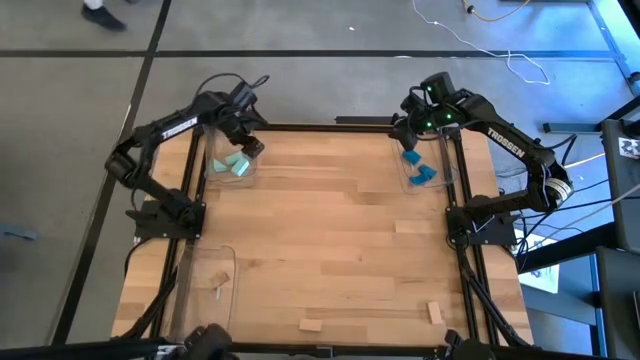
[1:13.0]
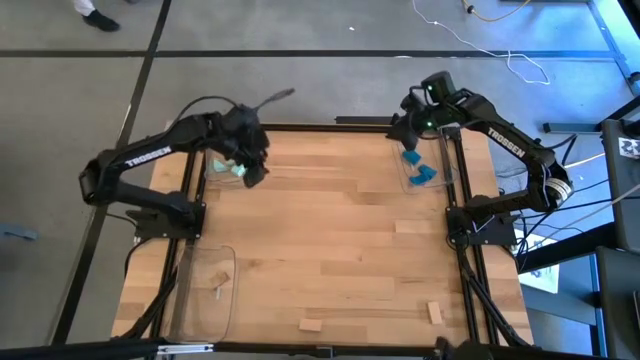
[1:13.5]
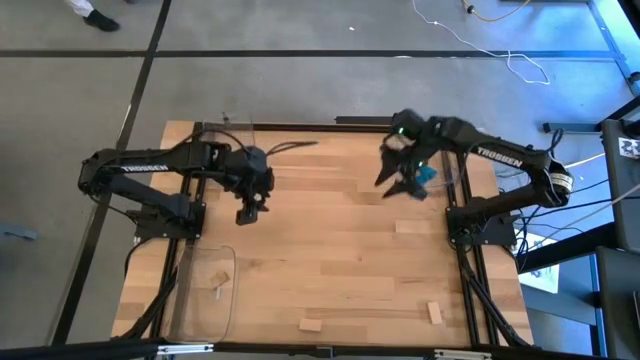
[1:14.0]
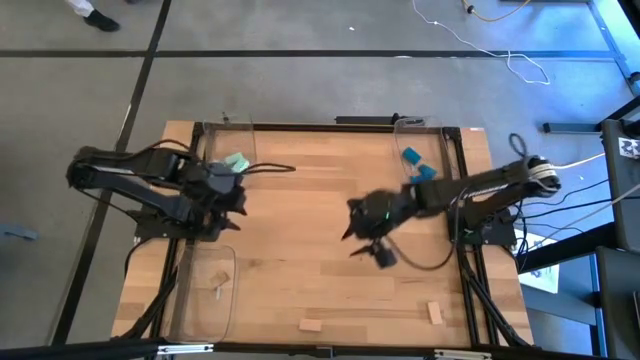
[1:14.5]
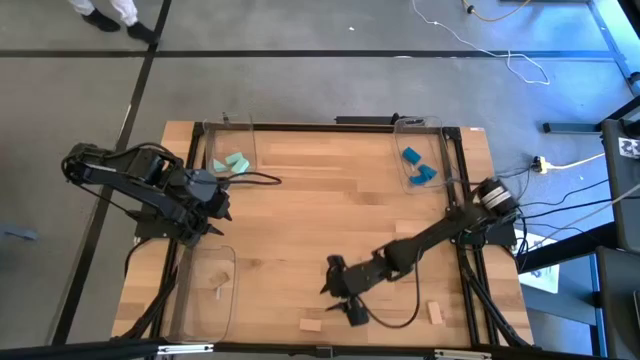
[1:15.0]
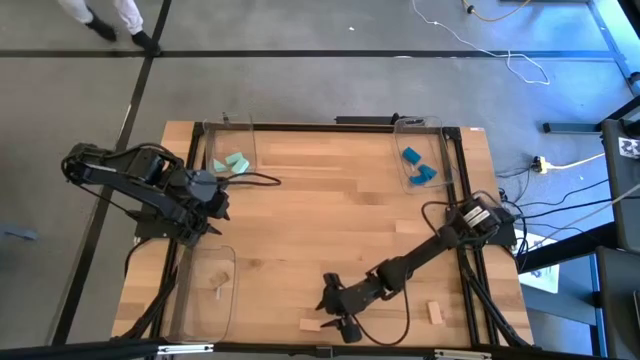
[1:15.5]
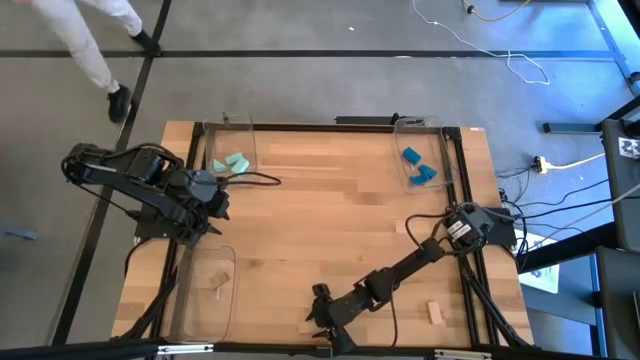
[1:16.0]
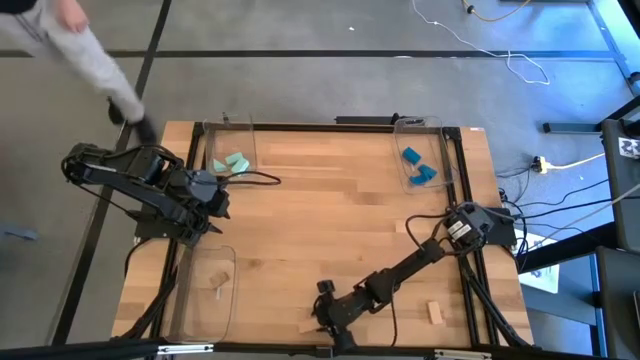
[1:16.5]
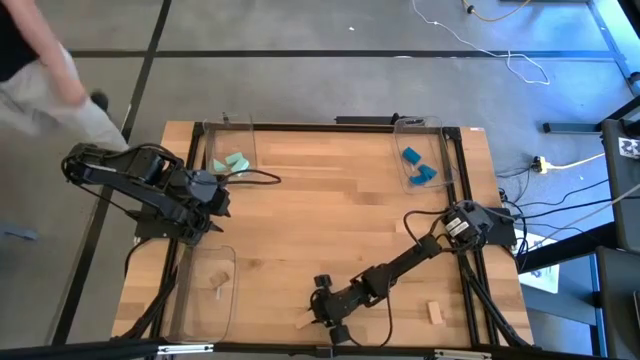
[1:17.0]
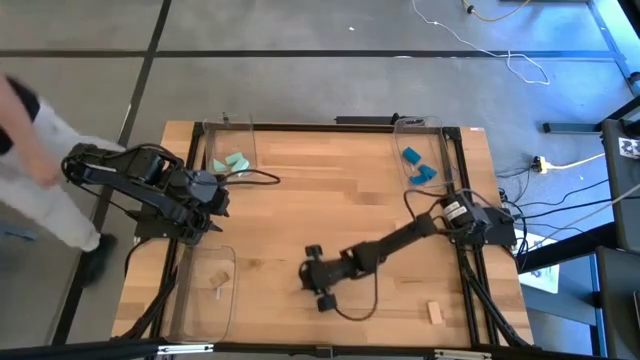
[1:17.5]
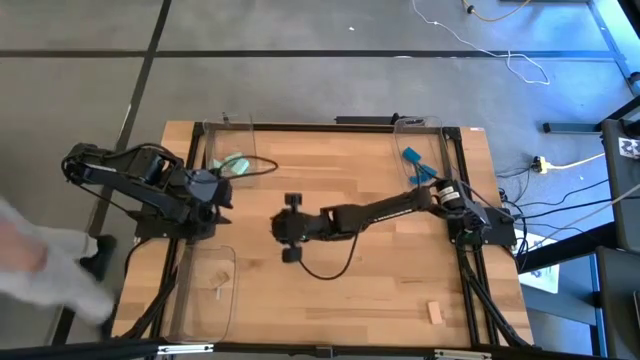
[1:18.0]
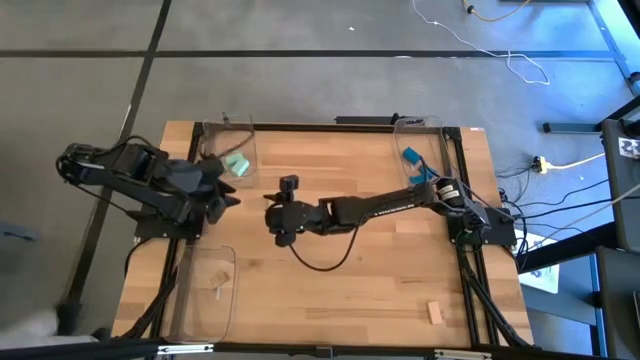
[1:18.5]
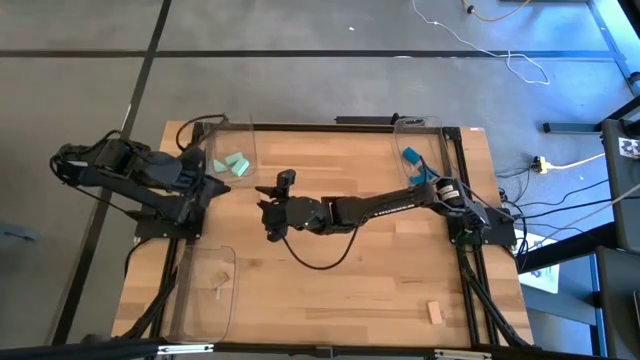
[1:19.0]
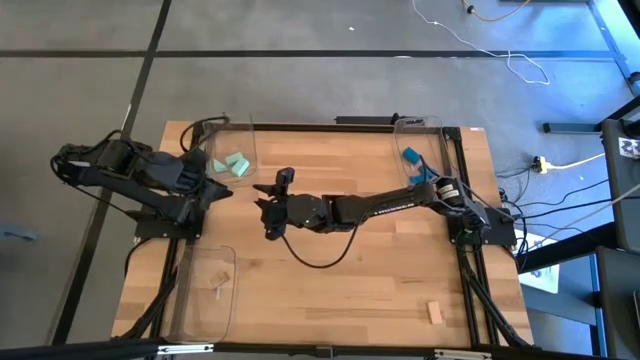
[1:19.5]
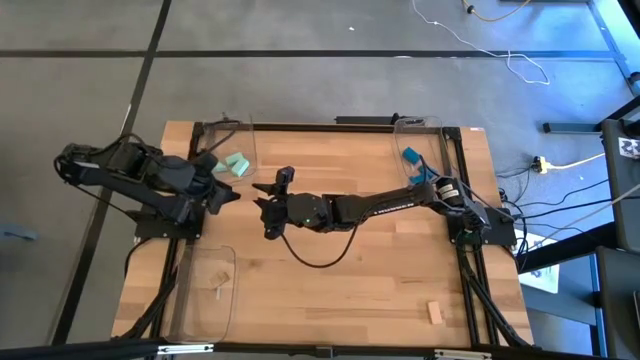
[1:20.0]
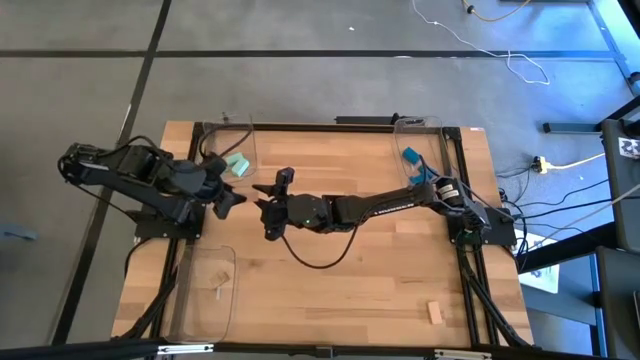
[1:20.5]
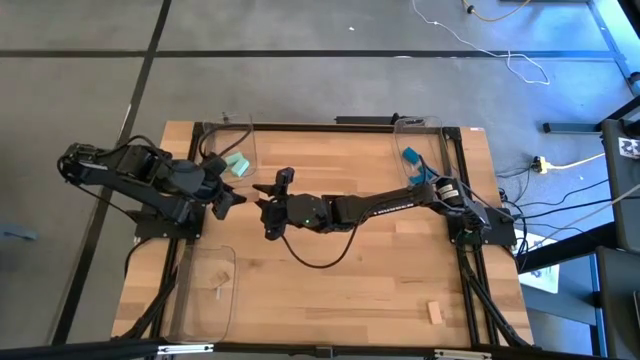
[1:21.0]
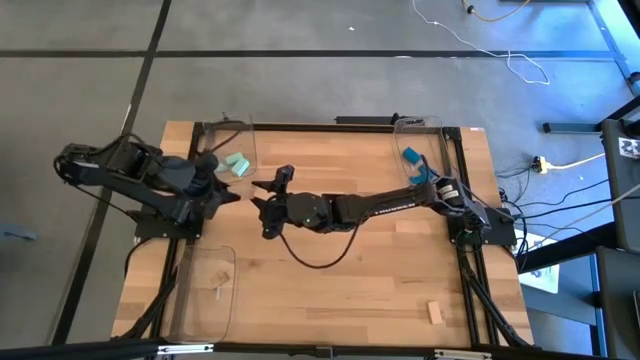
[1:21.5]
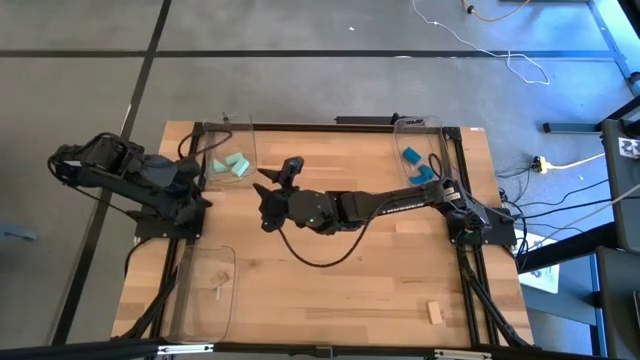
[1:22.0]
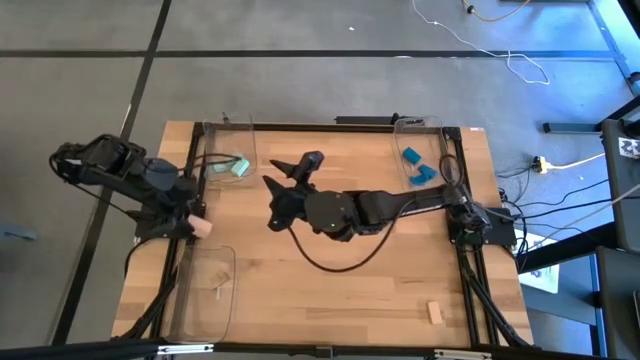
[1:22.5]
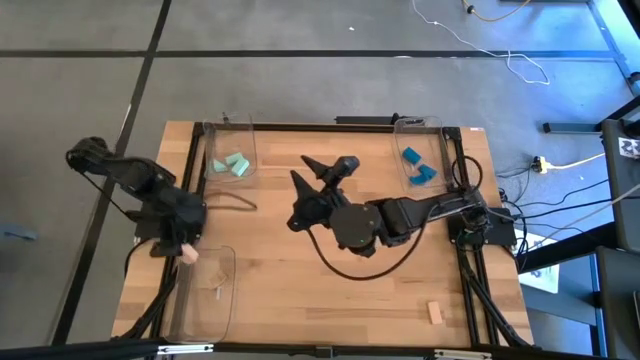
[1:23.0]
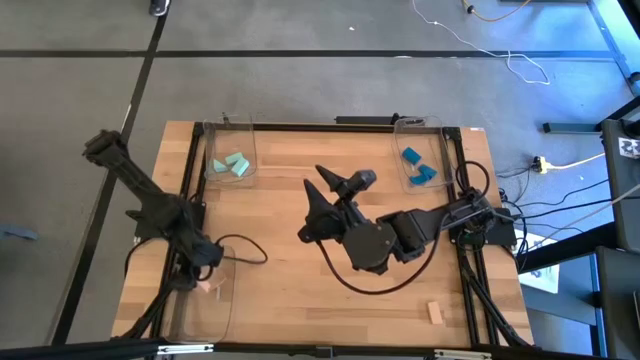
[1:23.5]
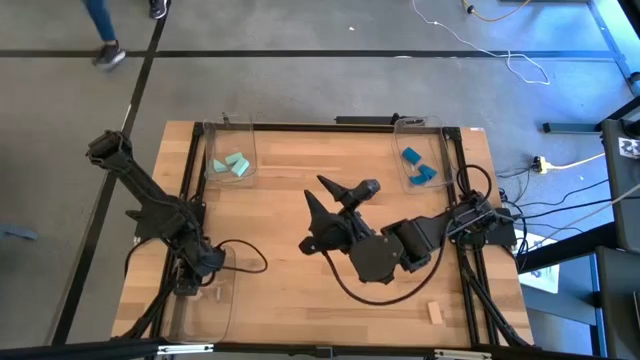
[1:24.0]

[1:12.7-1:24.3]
Task: Sort & place blocks by color
Put the left brown block into the bottom transparent bin

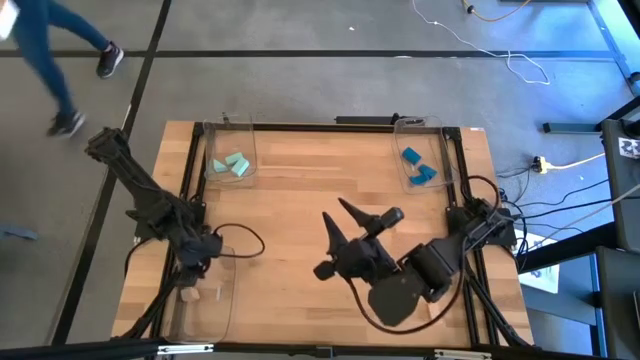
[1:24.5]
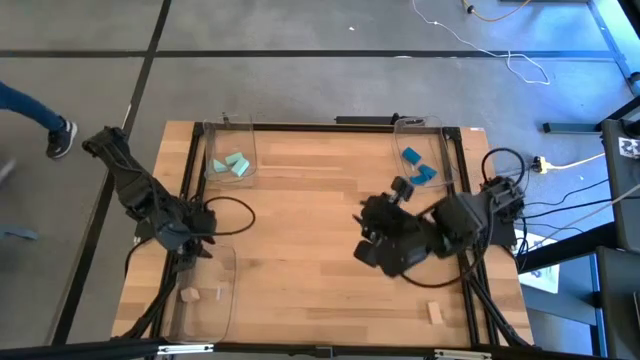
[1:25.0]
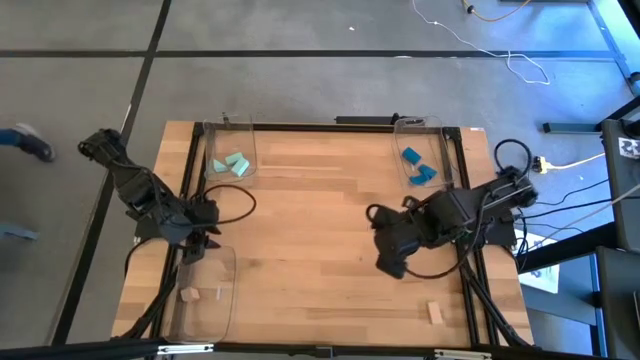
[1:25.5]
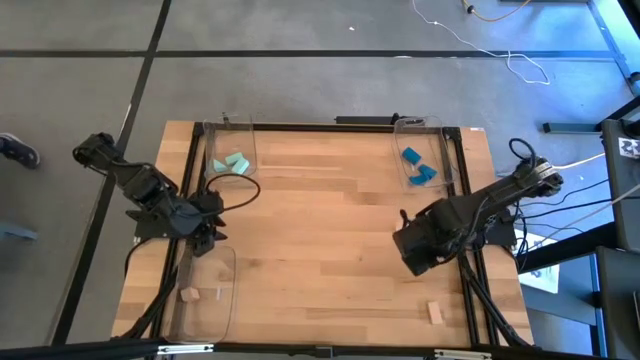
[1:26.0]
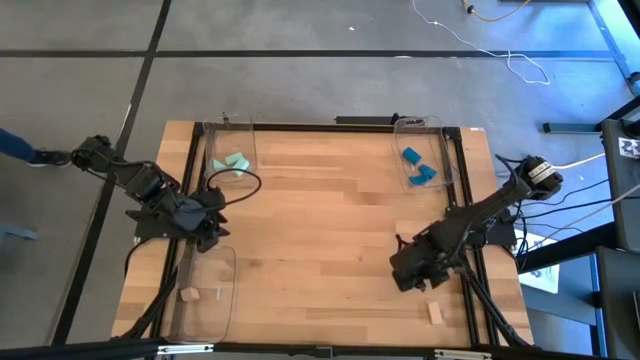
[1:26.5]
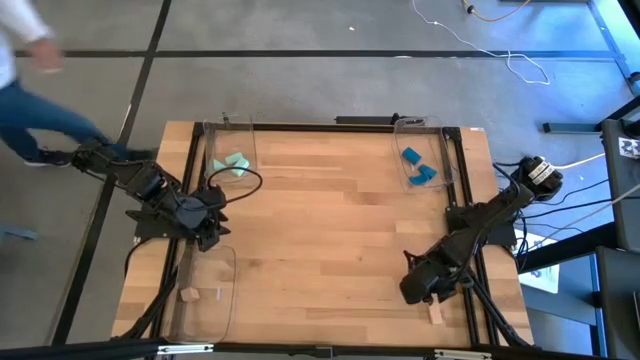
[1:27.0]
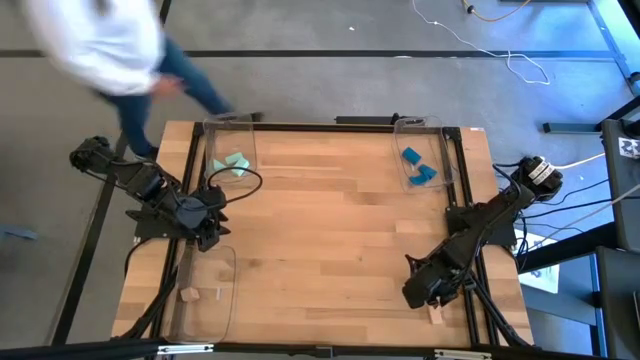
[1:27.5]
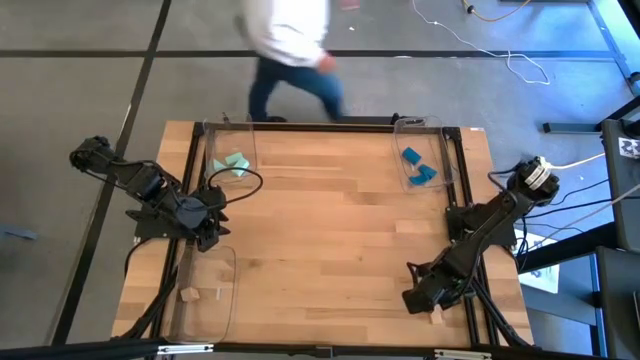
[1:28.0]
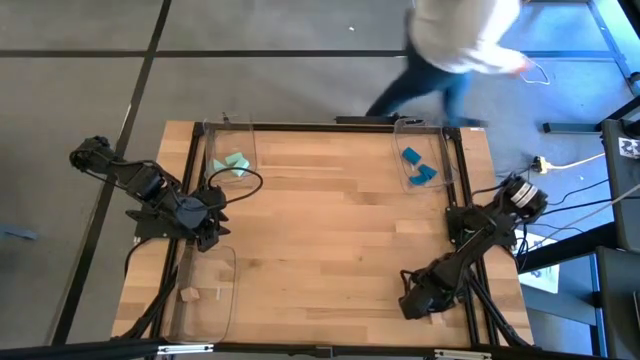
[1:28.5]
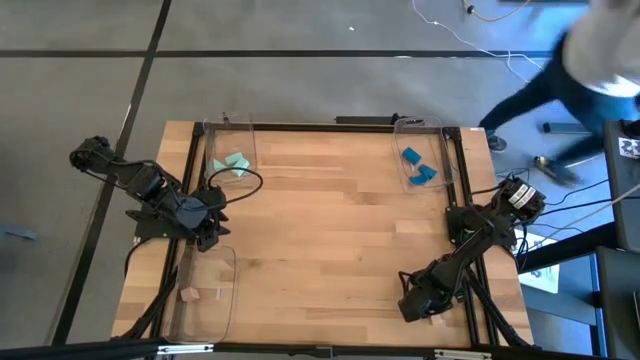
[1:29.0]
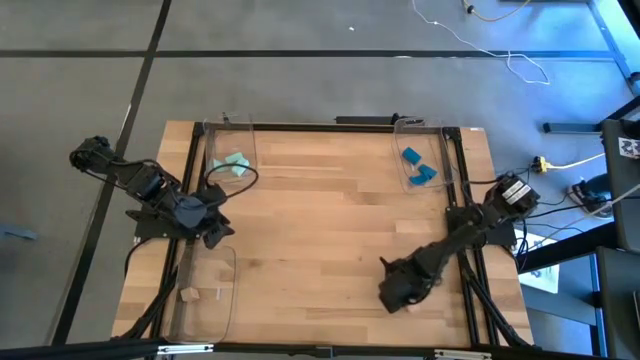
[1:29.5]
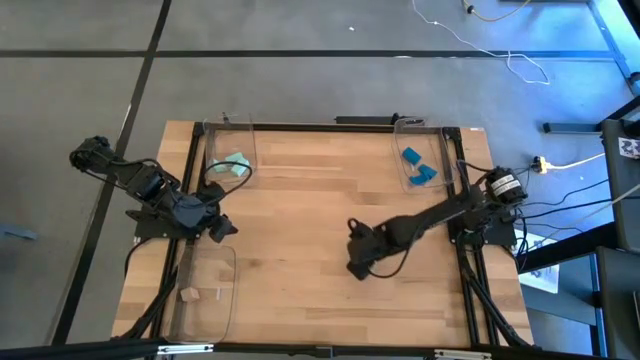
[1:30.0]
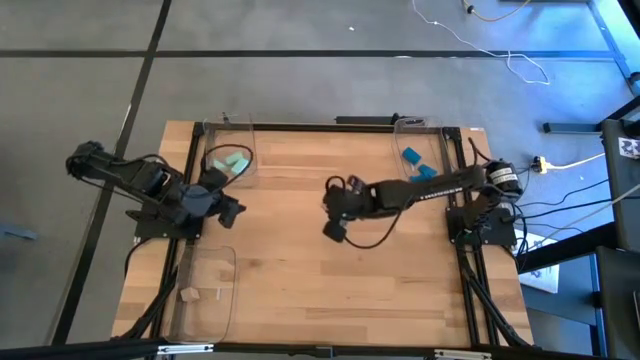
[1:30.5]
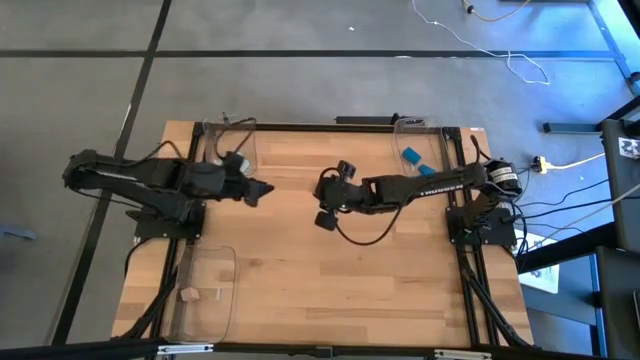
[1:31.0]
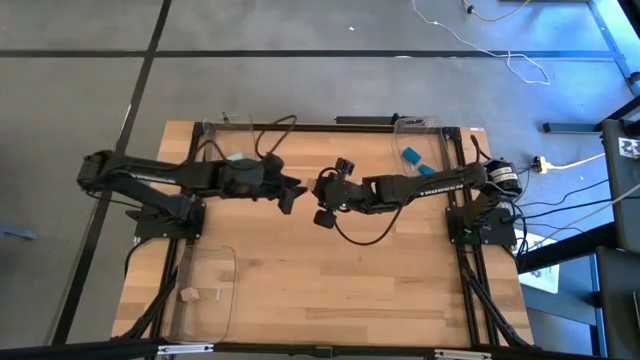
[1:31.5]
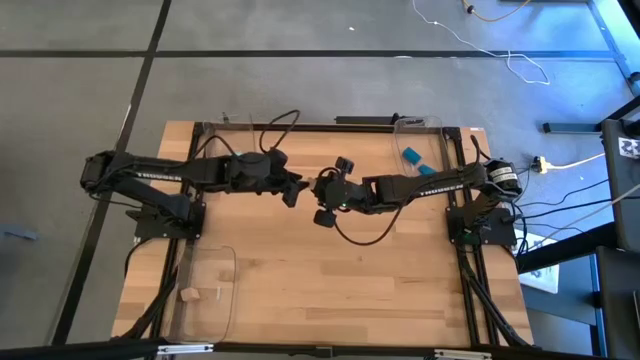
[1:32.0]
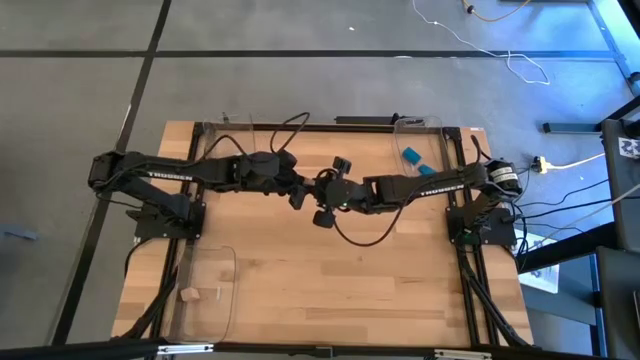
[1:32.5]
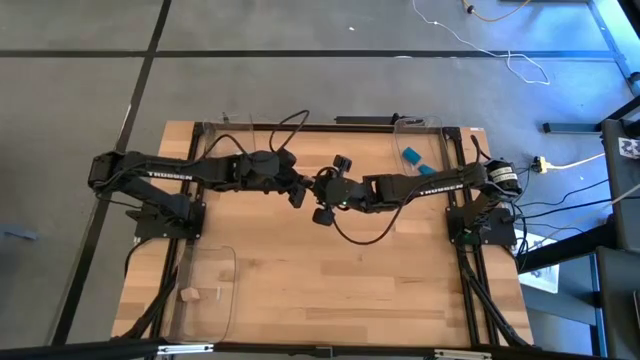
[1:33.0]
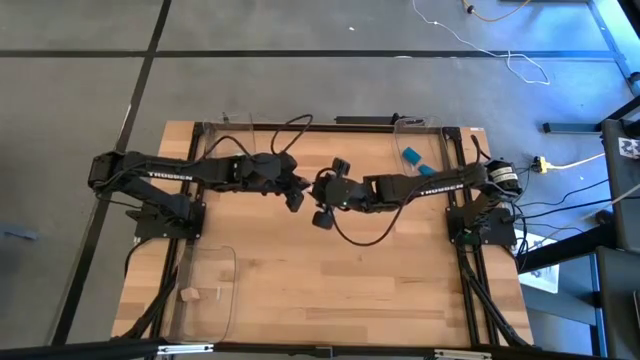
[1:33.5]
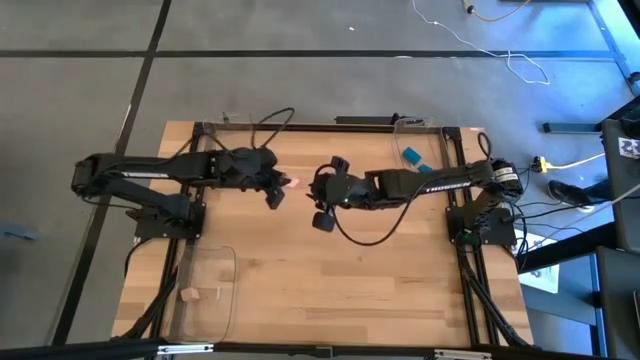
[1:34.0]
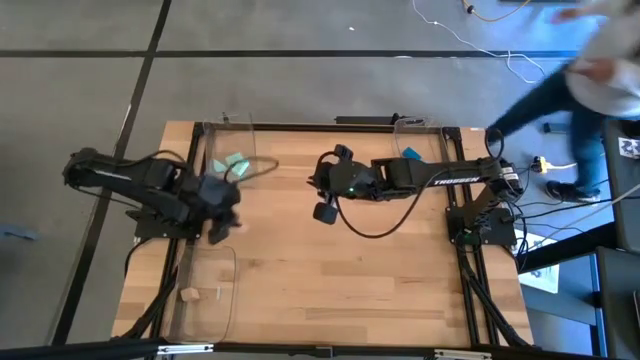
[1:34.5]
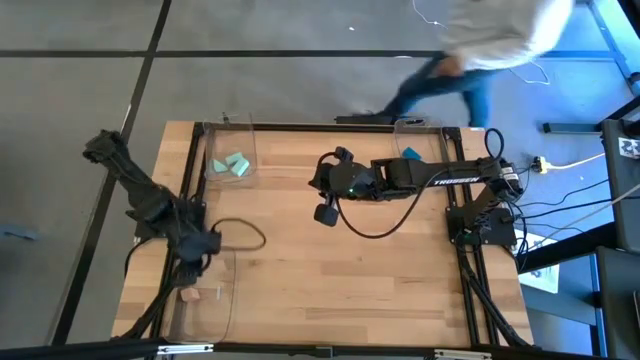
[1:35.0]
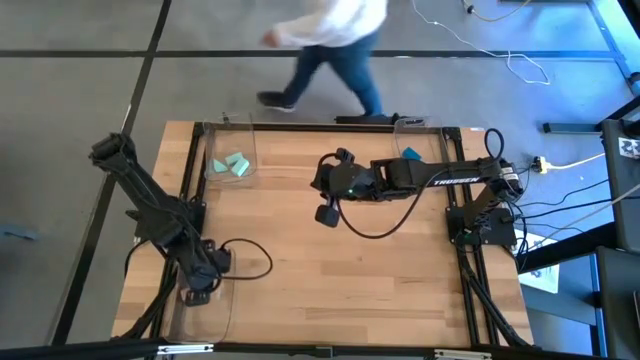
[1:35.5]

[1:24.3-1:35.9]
Put the brown block into the bottom transparent bin
